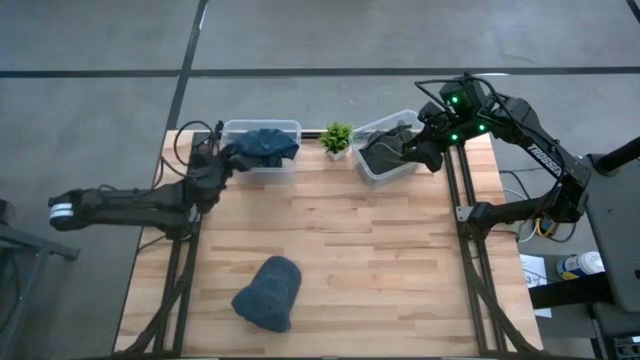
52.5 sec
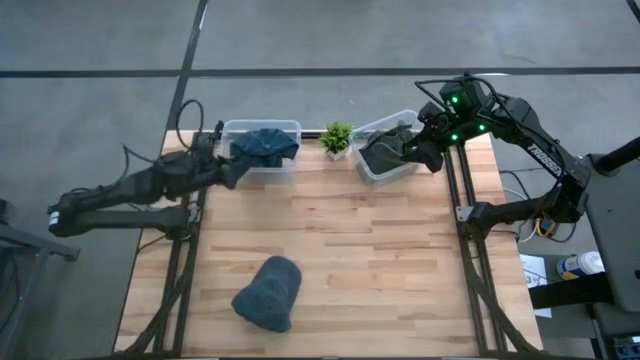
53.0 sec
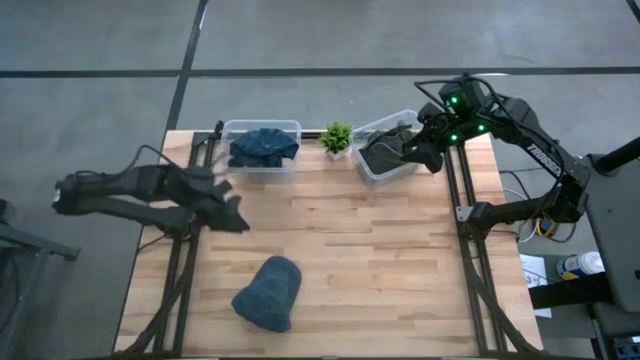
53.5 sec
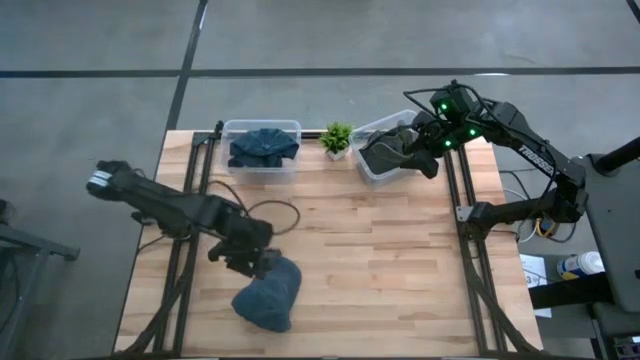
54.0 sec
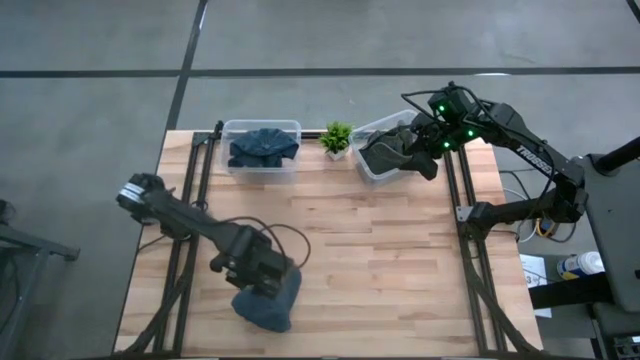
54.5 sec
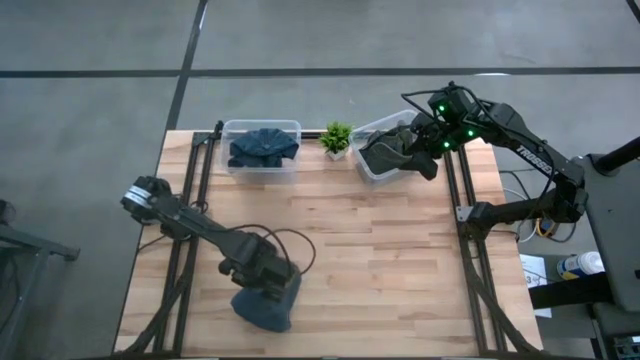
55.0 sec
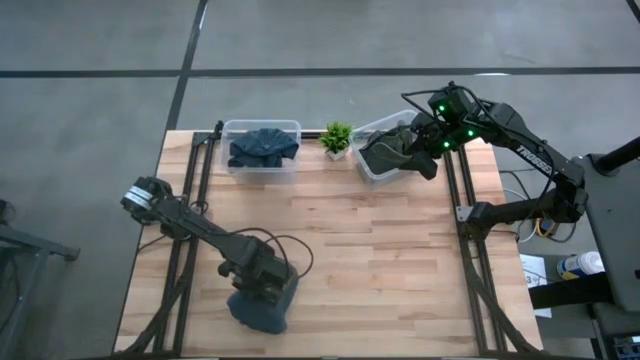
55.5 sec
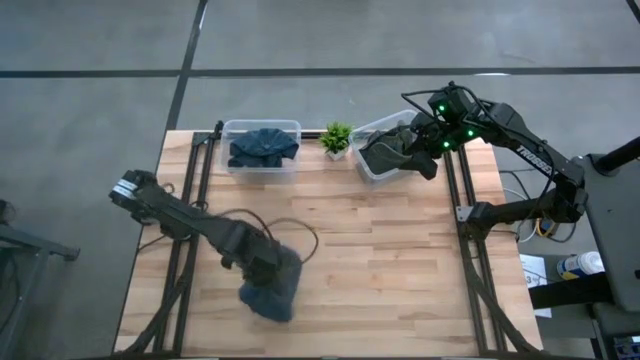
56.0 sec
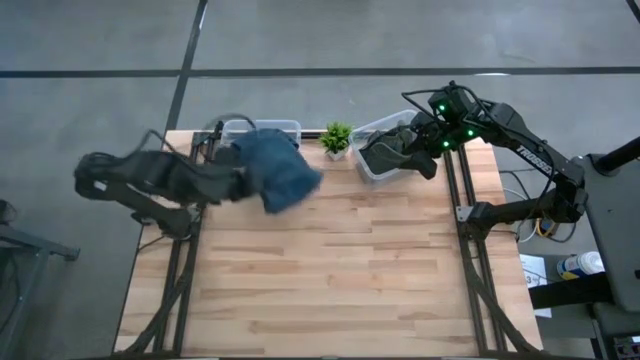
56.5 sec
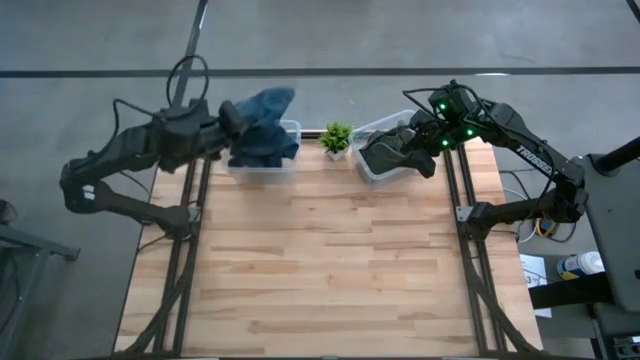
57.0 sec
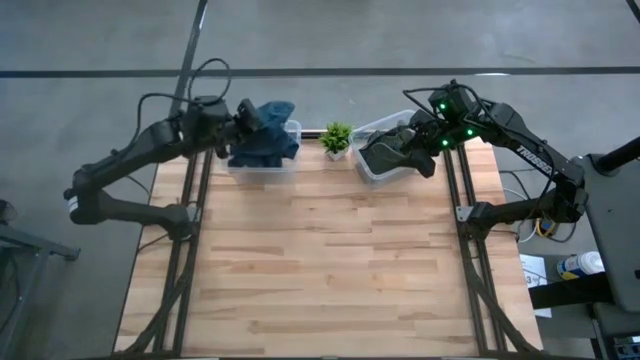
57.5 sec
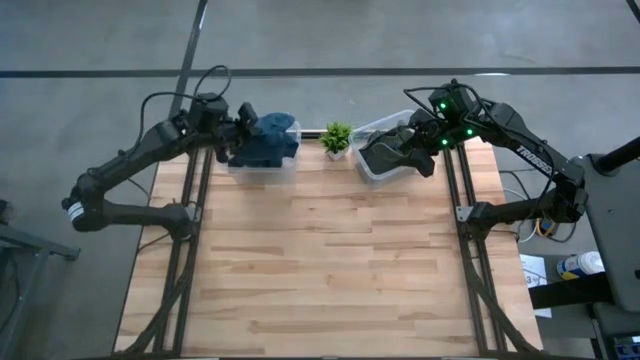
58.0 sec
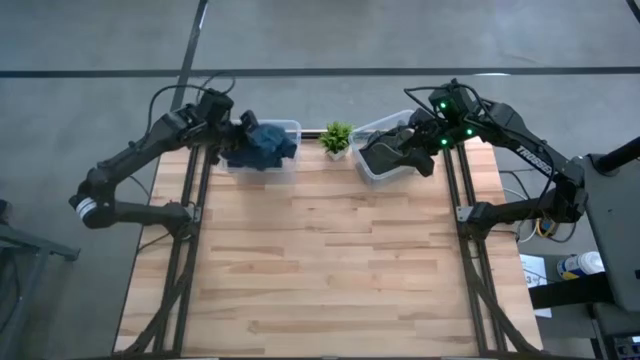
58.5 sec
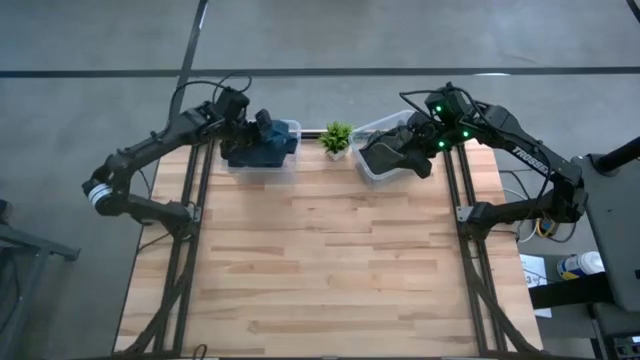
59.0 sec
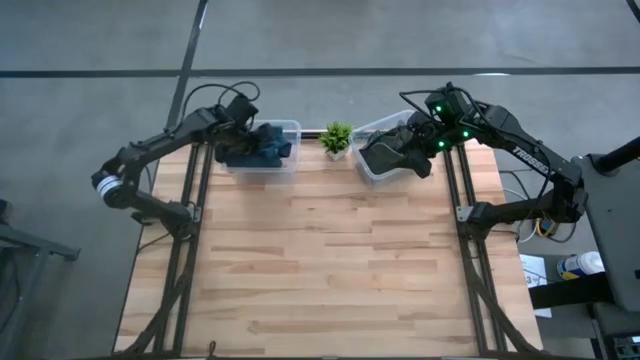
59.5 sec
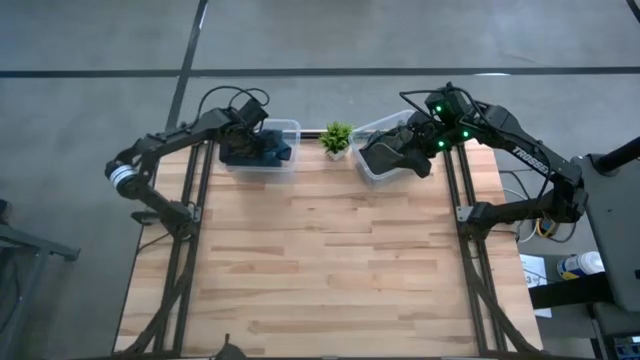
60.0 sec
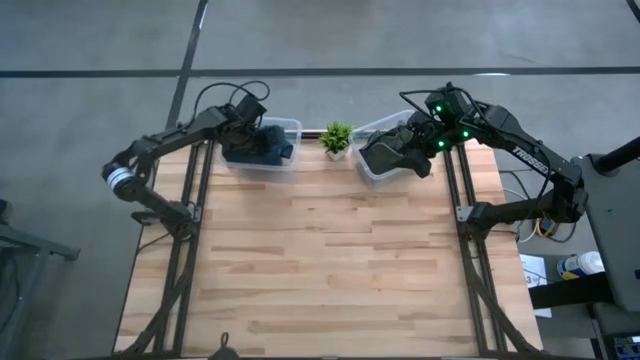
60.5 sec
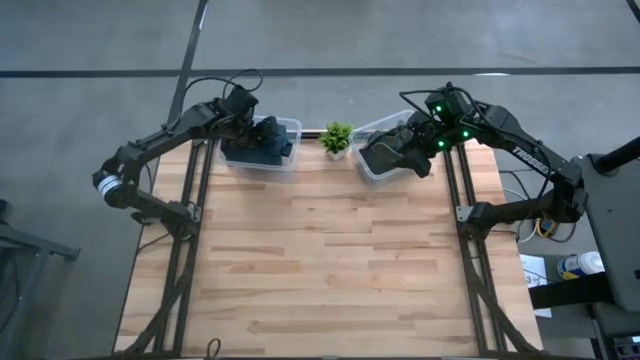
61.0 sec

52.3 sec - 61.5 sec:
Task: Pick & Place hat
Put the dark blue cap into the left transparent bin

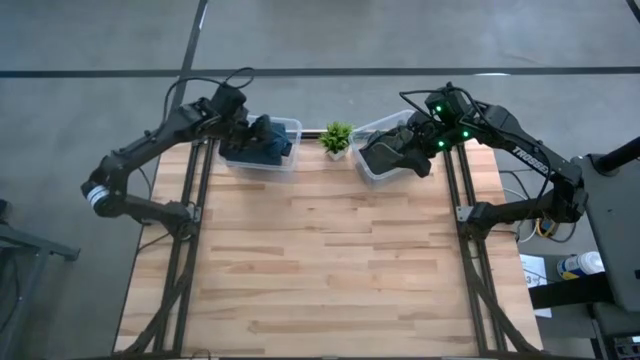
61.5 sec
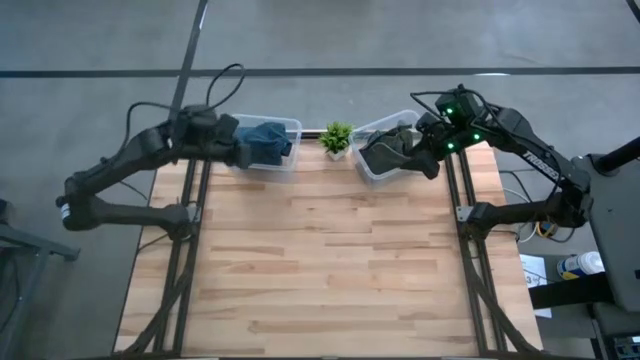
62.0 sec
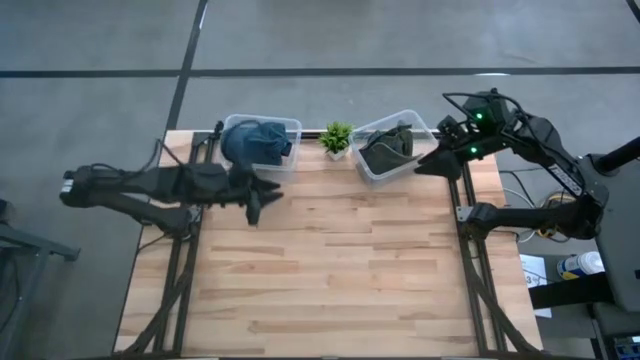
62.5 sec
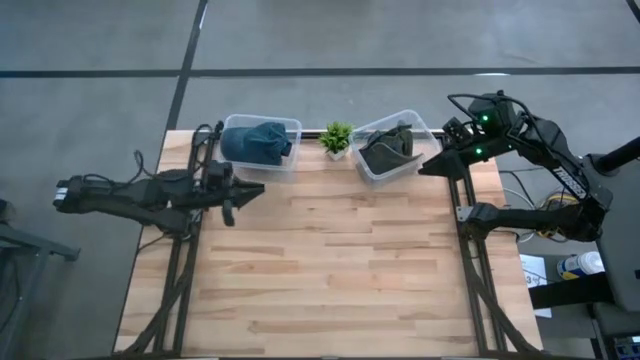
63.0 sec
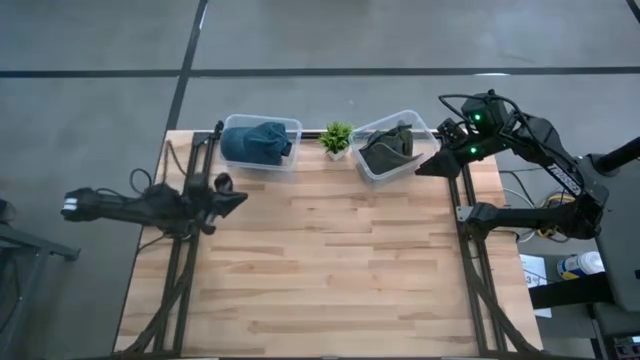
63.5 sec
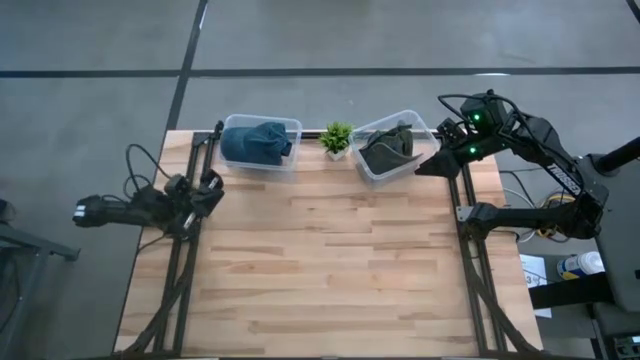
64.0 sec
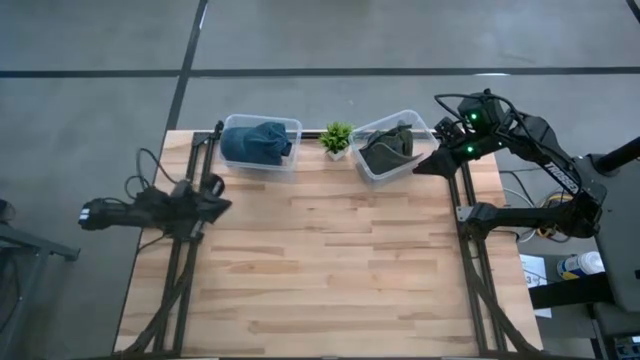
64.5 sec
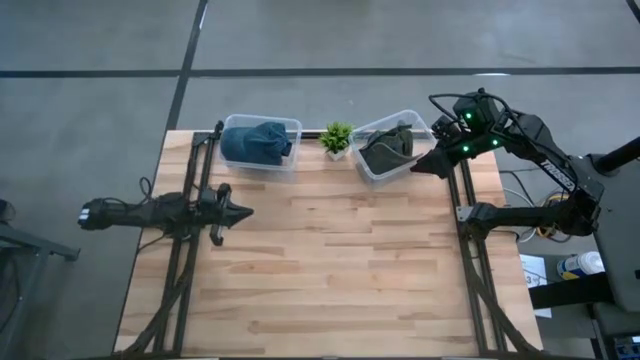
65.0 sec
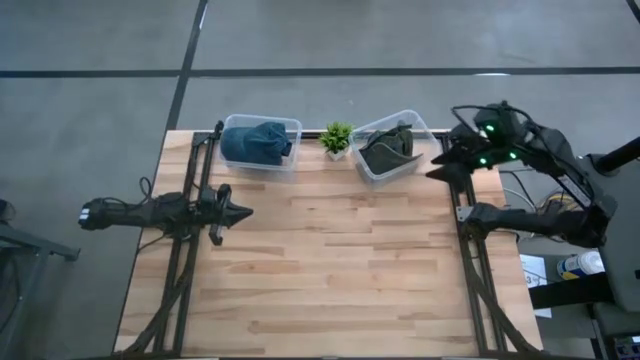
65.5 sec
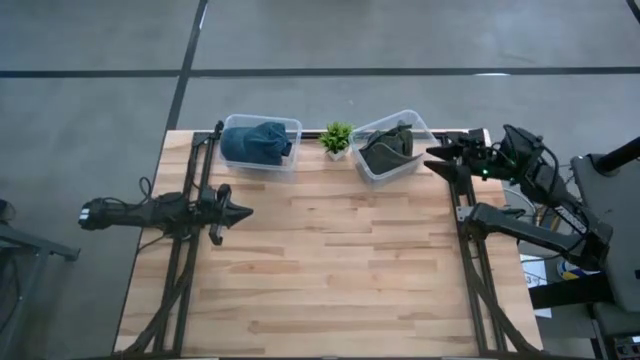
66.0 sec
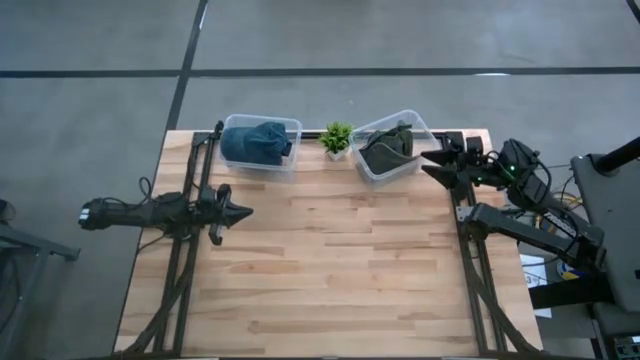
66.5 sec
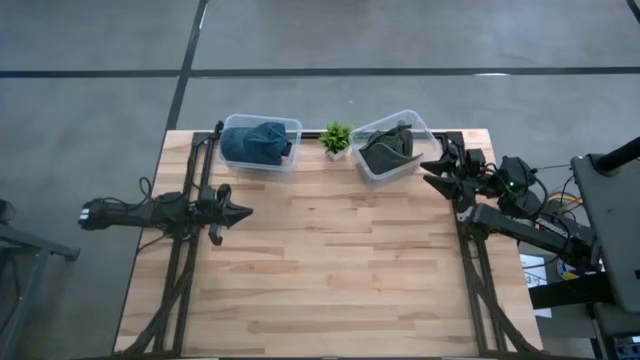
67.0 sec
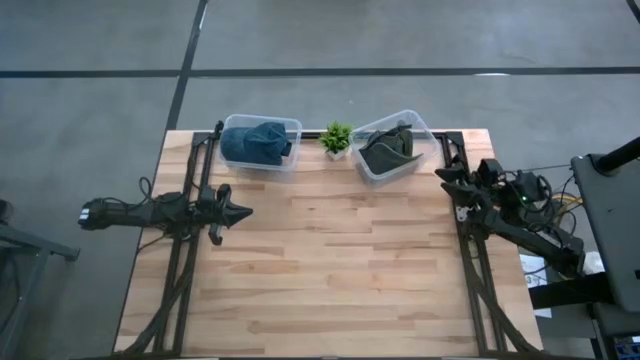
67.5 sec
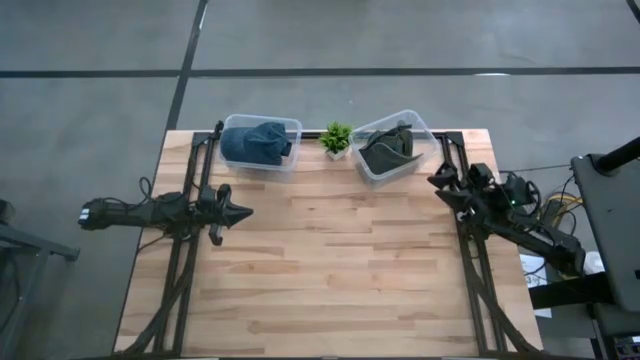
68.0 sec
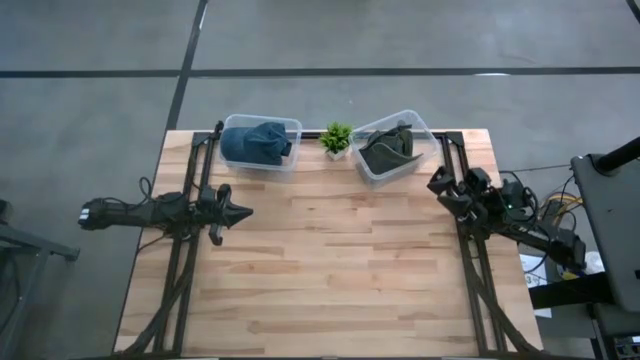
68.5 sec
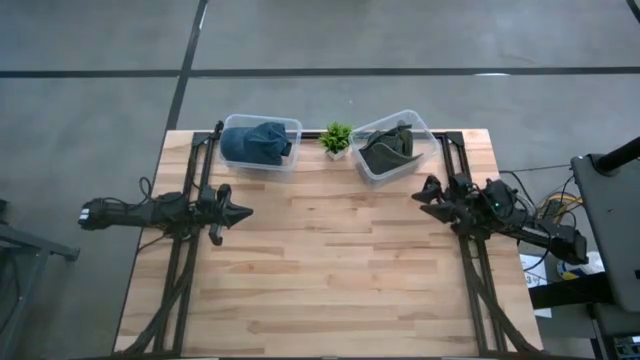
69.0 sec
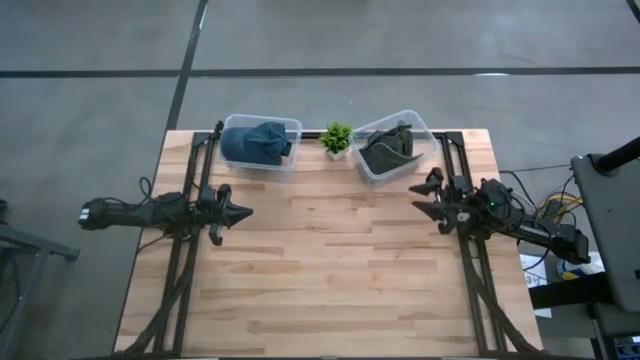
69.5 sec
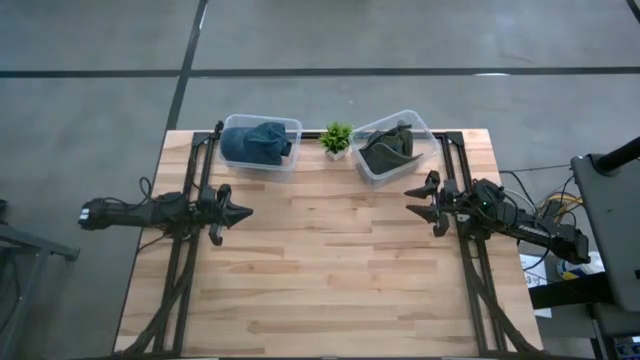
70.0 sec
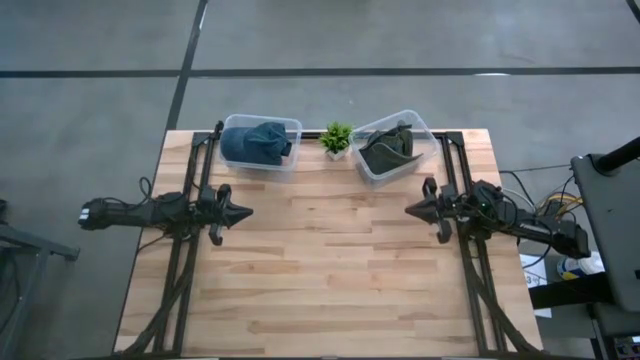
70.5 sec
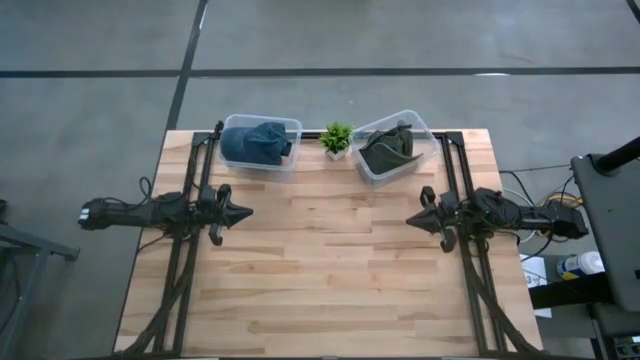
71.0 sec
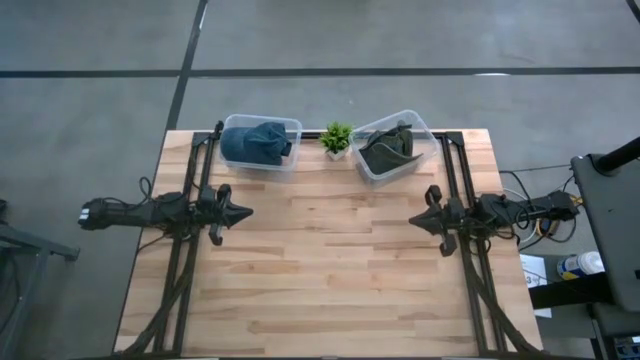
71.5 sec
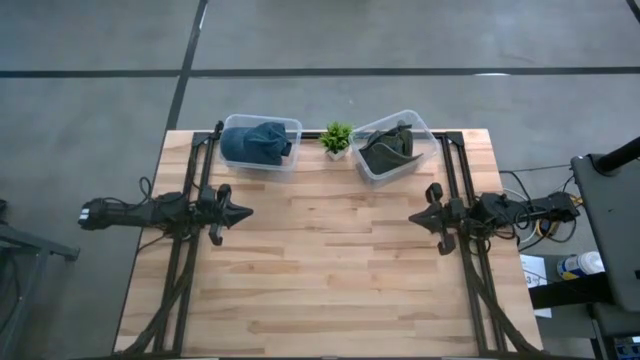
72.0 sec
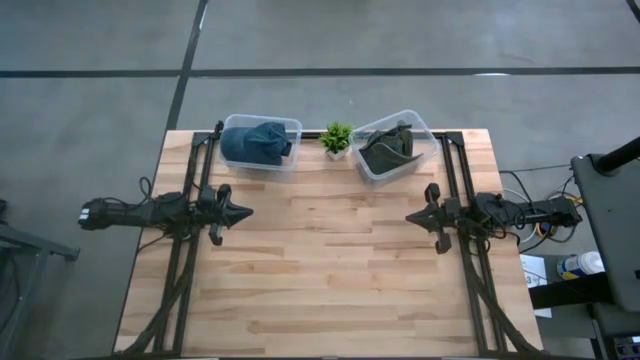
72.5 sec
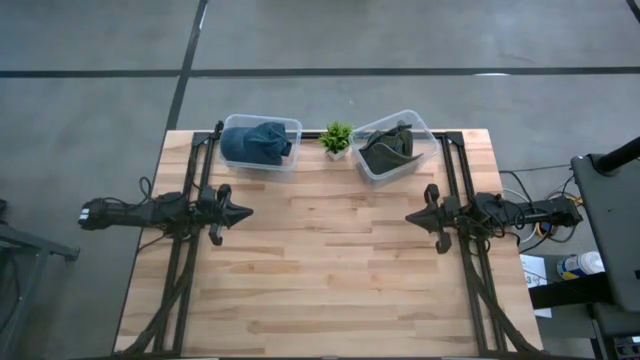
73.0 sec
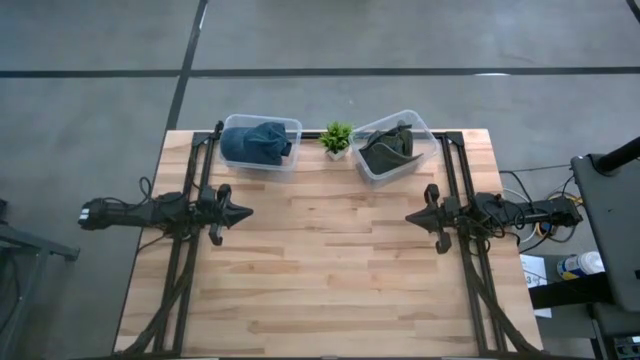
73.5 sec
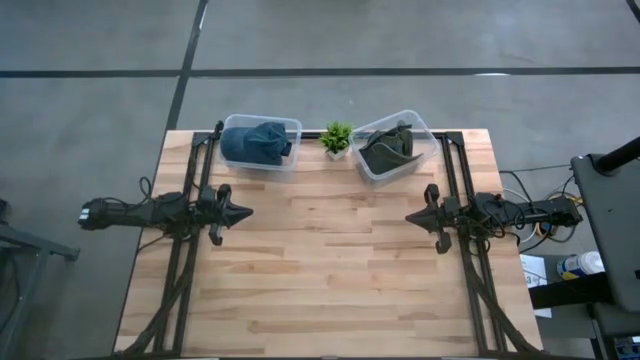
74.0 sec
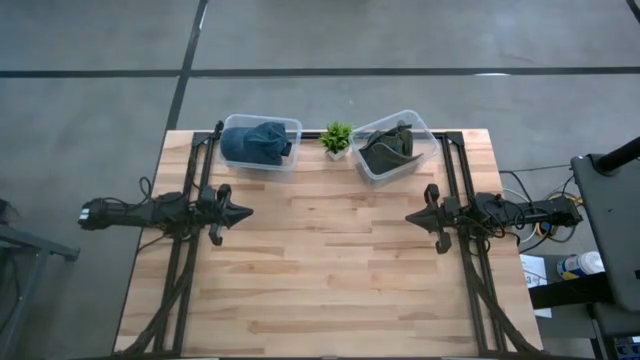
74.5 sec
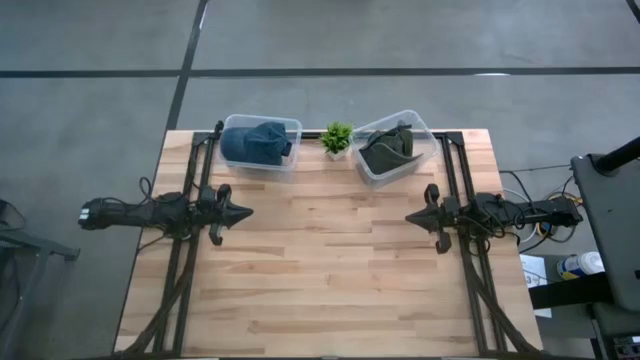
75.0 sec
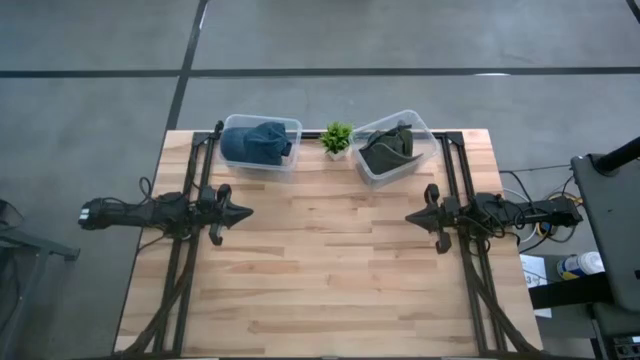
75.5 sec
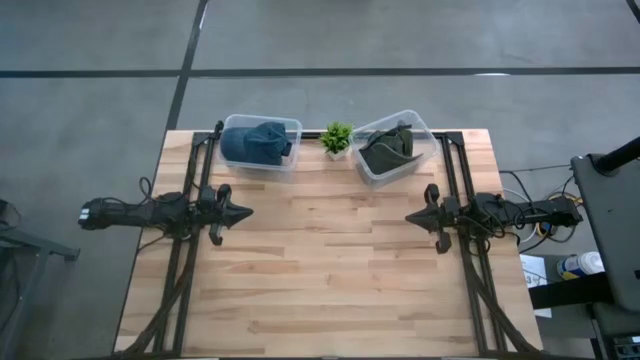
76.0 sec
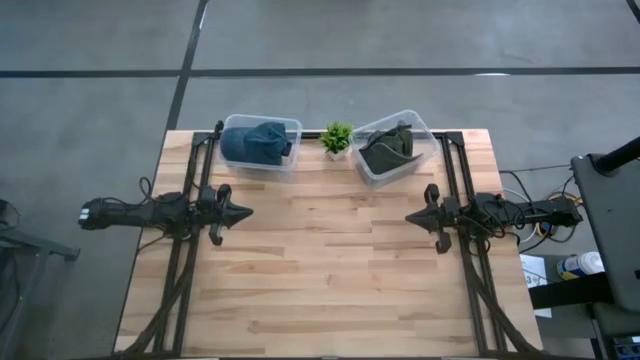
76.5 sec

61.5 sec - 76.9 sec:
Return to Home Position
